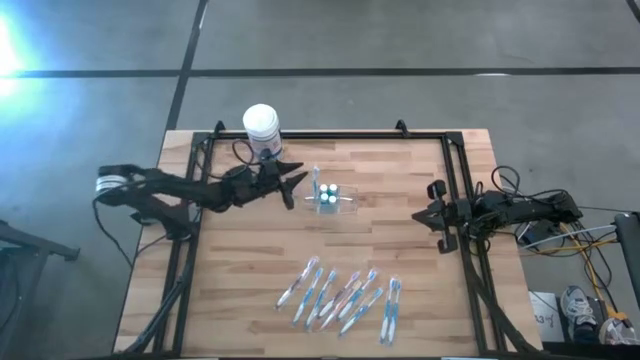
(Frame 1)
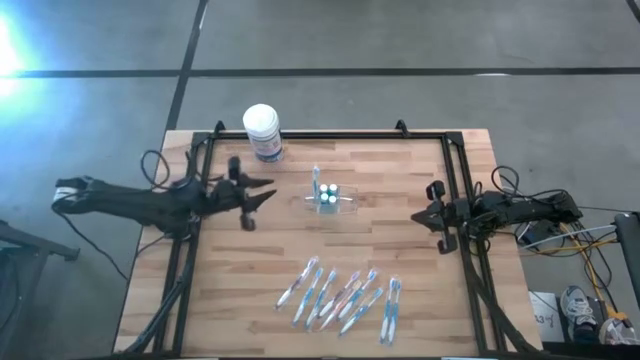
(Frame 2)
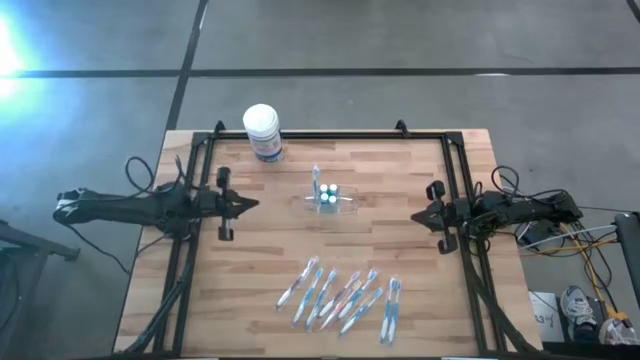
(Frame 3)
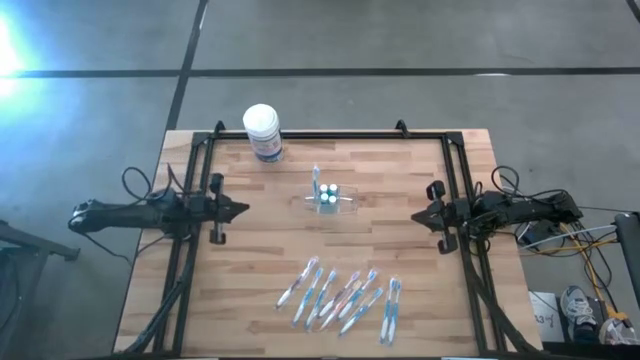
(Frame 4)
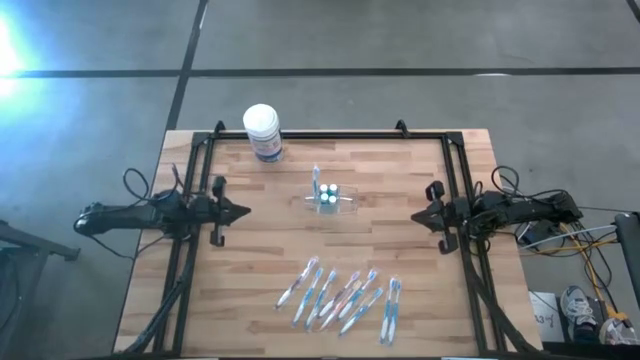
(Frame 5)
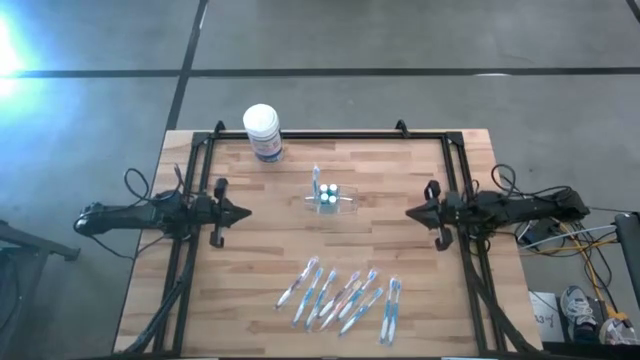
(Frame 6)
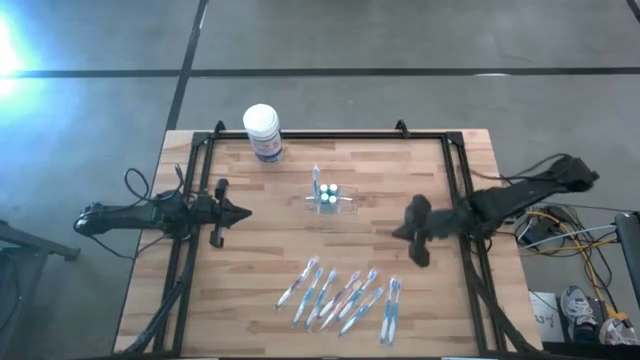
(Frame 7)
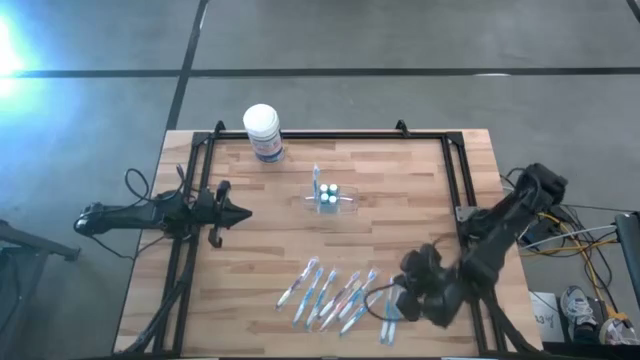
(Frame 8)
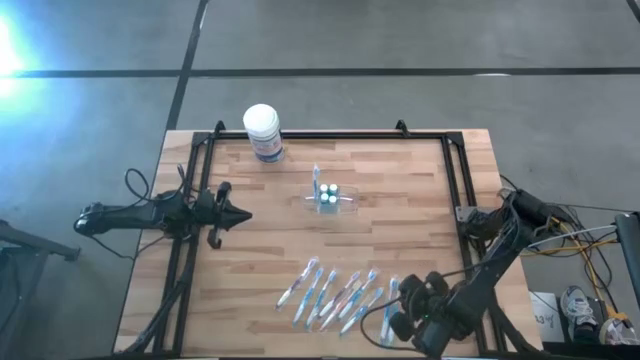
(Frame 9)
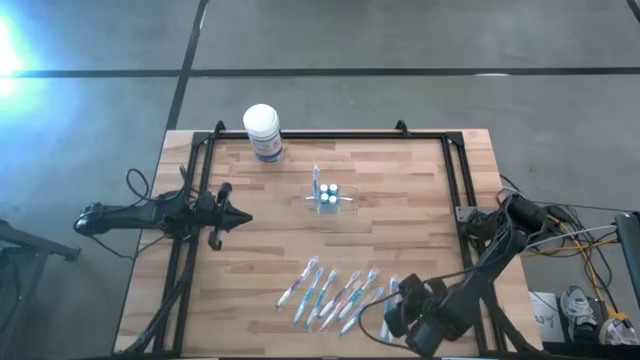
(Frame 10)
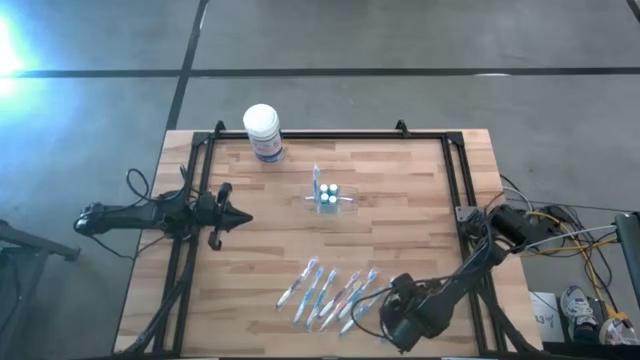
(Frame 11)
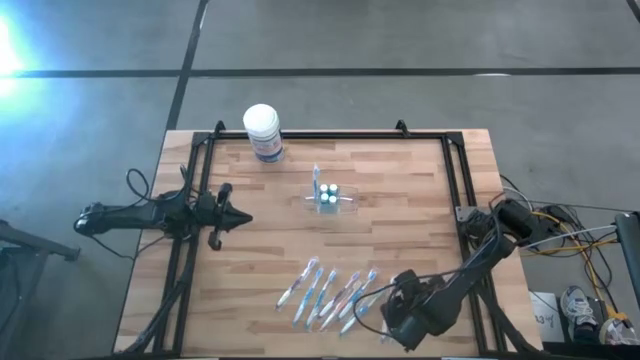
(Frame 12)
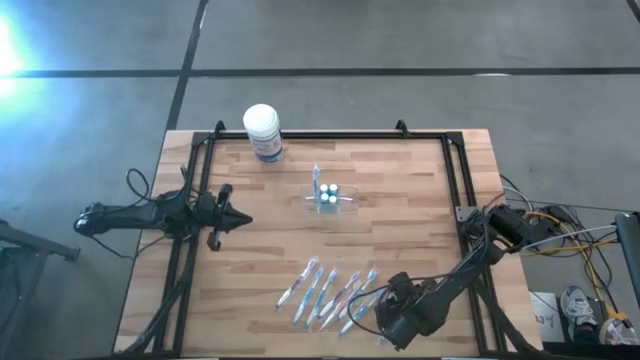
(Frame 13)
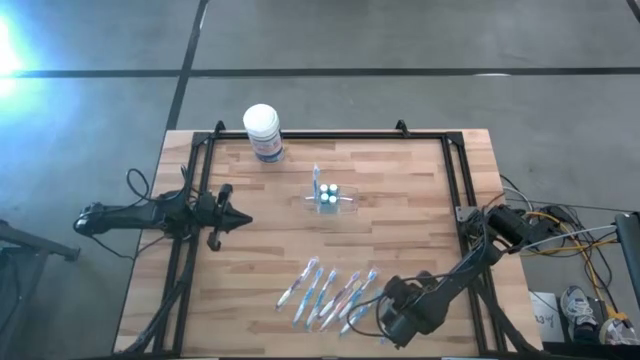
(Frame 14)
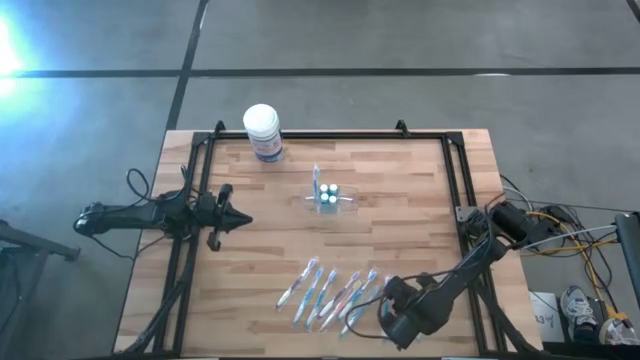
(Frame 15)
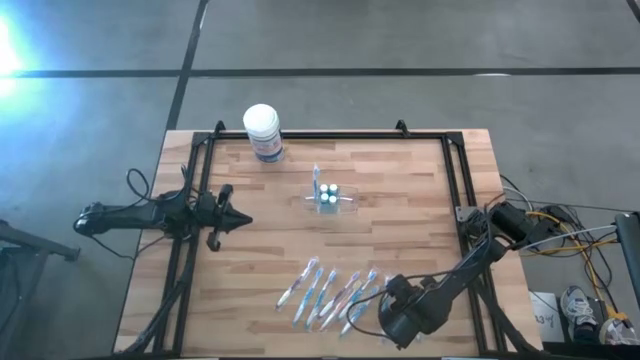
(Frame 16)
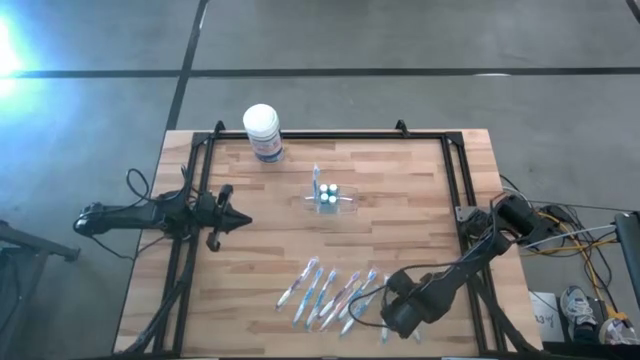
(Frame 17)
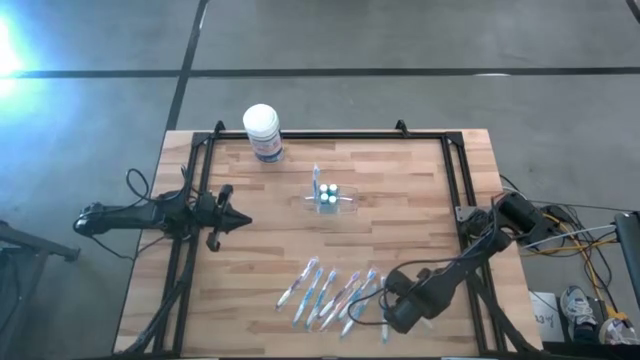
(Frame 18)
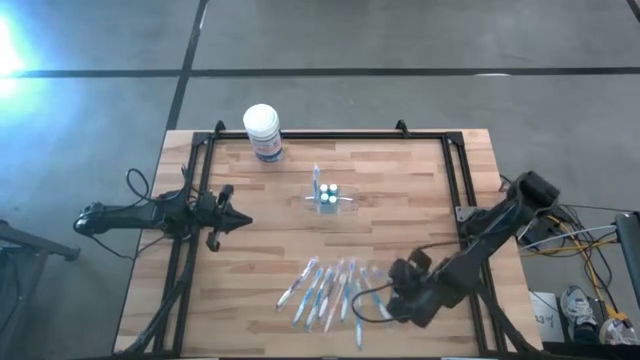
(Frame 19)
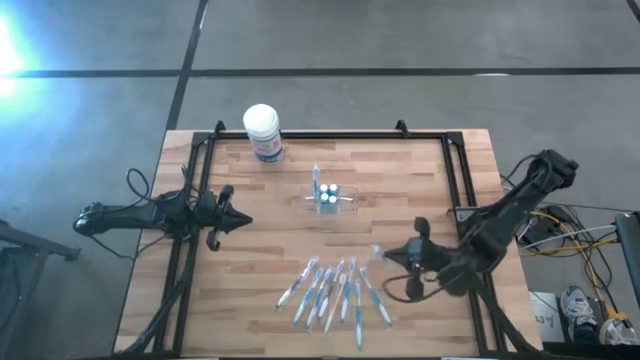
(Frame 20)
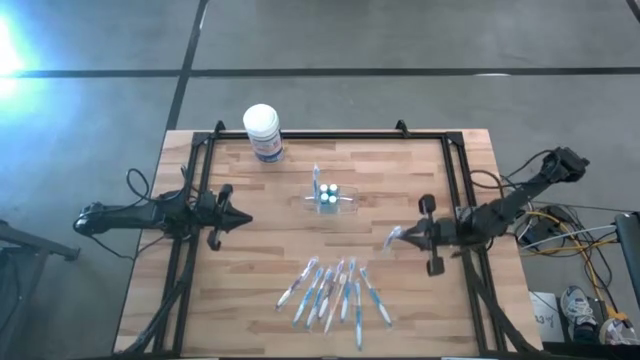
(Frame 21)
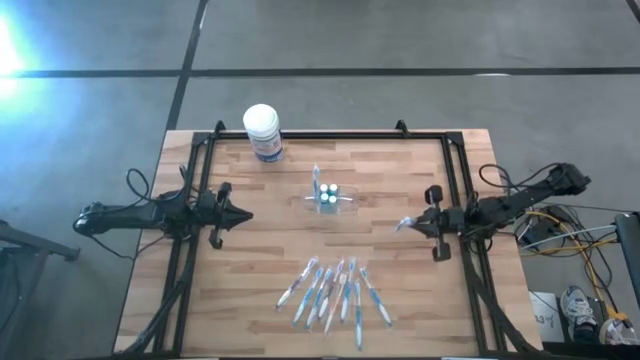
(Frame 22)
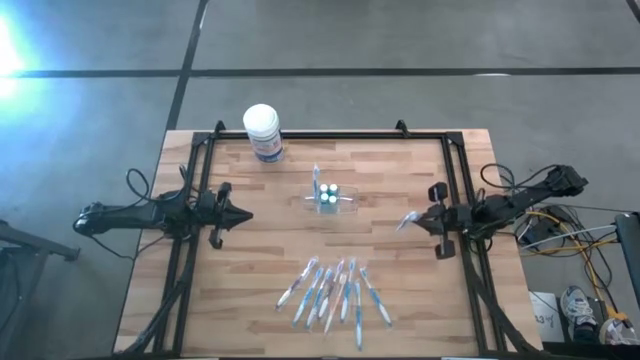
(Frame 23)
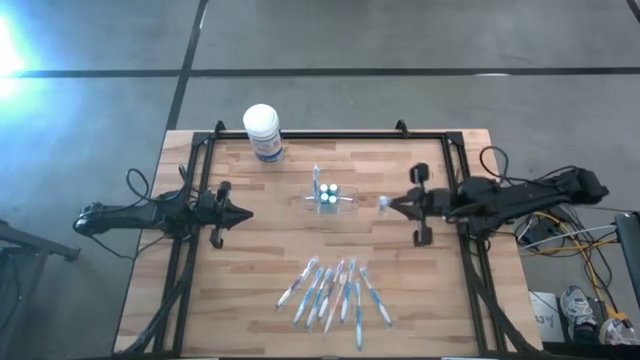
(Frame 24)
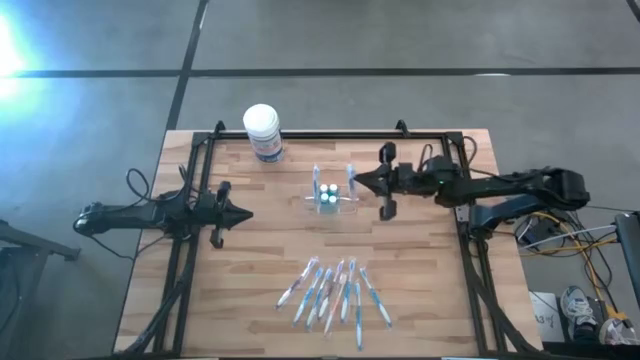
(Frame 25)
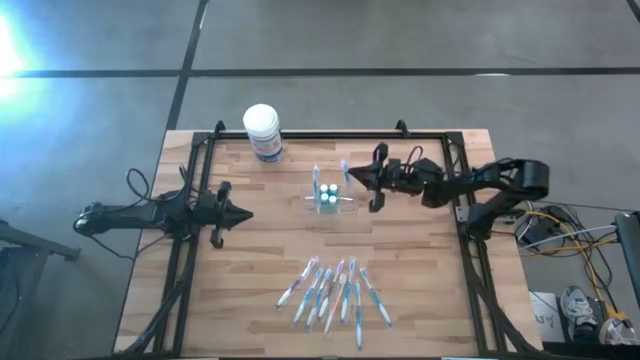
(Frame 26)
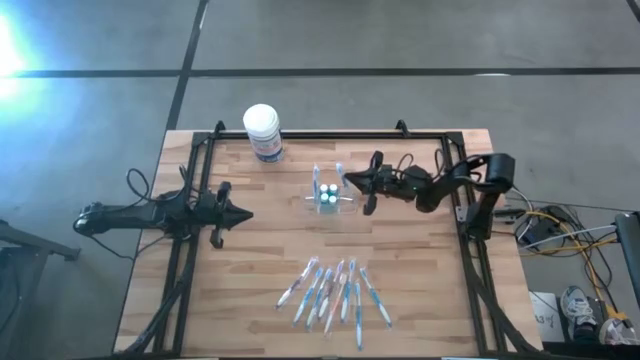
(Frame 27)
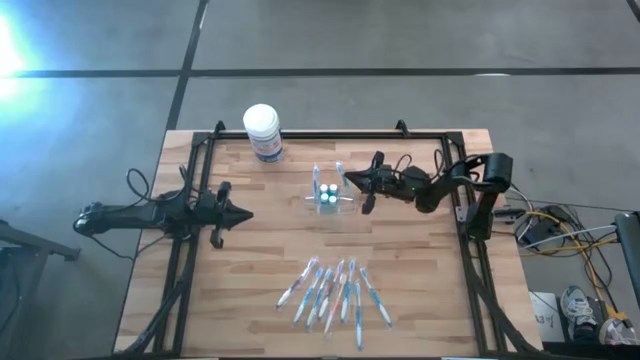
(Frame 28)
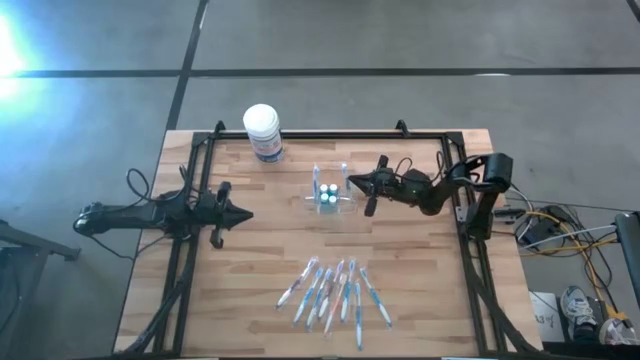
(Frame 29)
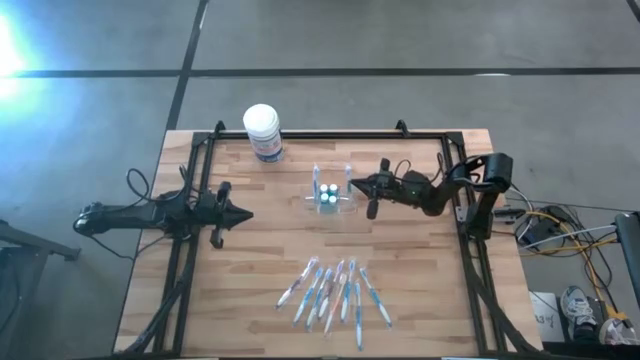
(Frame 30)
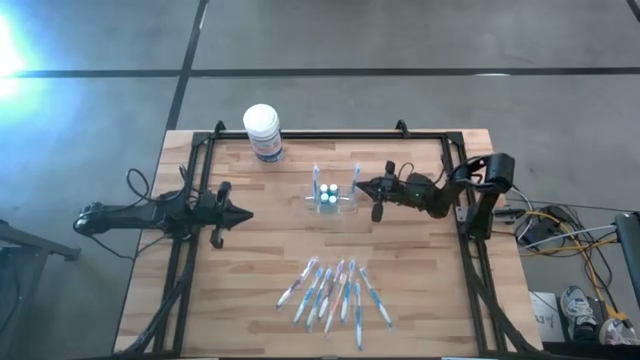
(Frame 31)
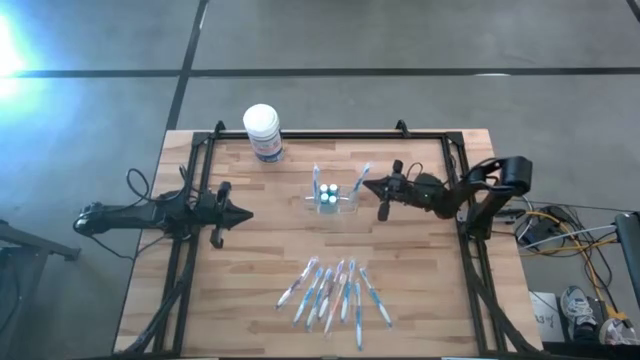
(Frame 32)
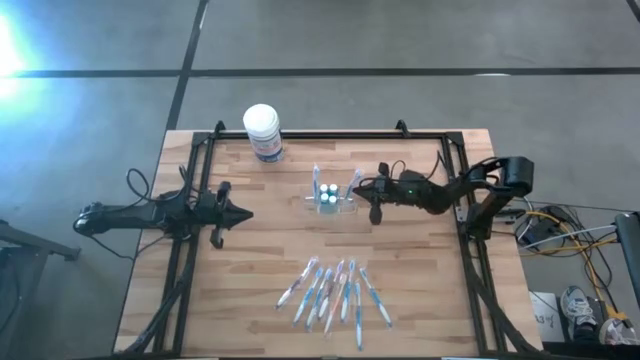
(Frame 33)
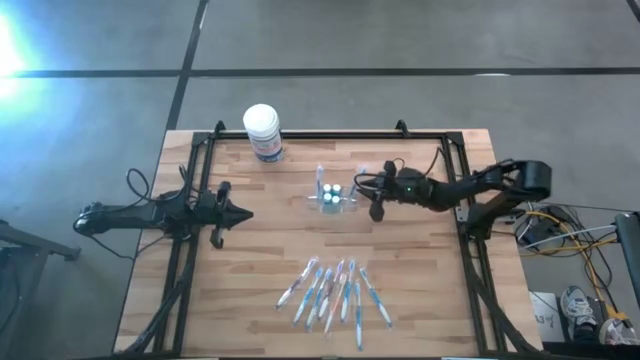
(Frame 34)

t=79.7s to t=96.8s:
Task: Pick & Place toothbrushing station
Put the blue toothbrush into the transparent bin organizer

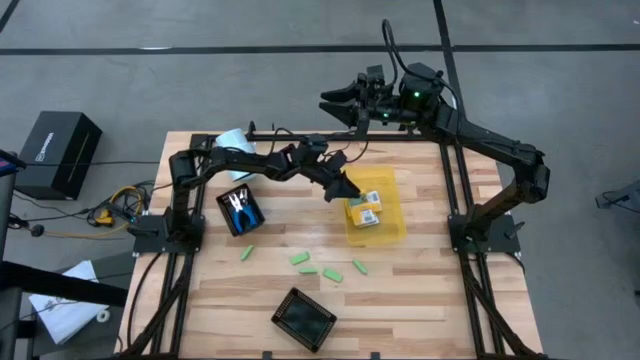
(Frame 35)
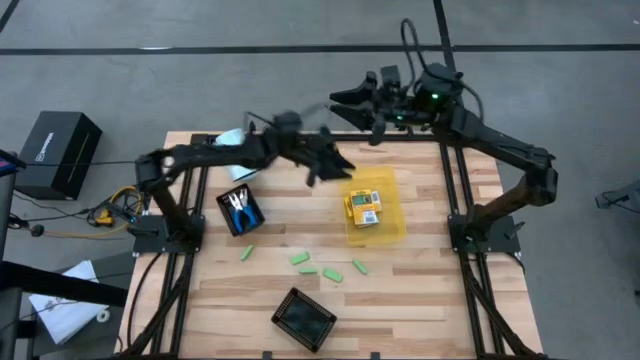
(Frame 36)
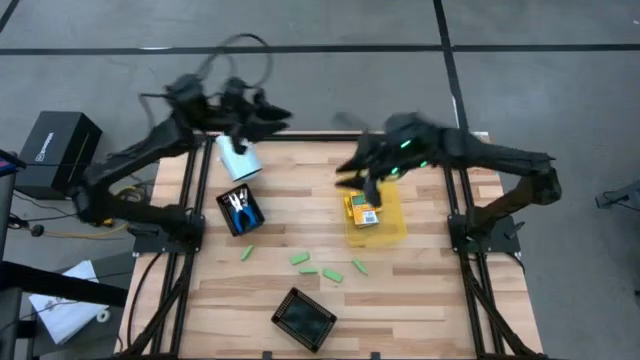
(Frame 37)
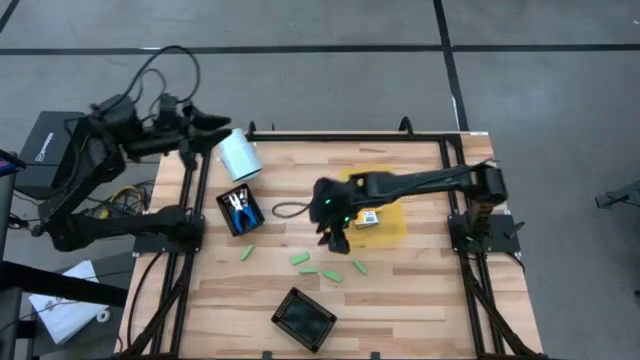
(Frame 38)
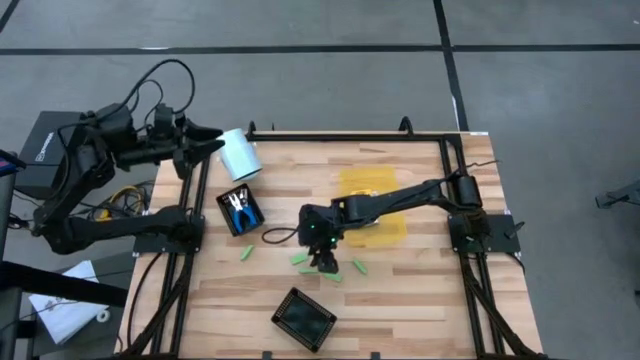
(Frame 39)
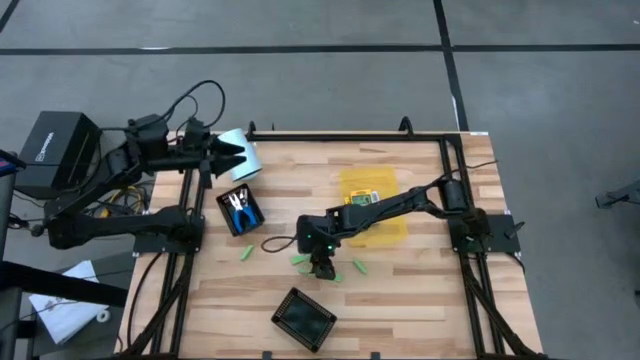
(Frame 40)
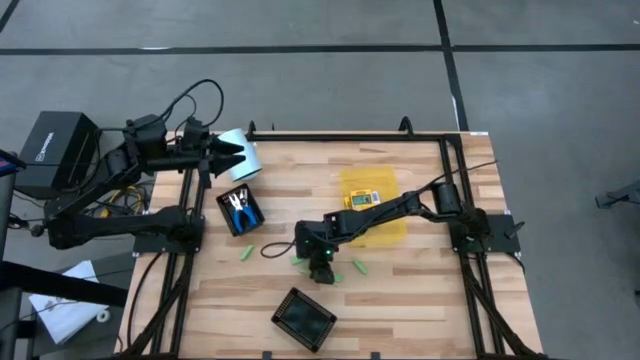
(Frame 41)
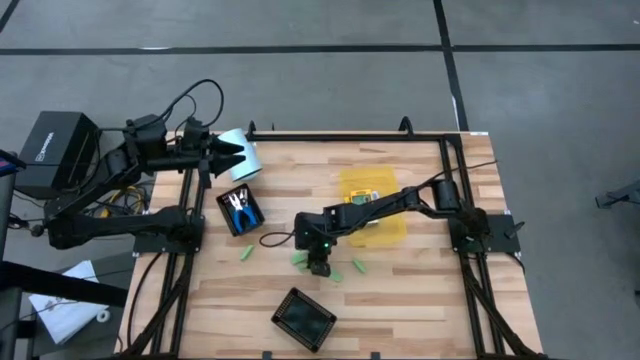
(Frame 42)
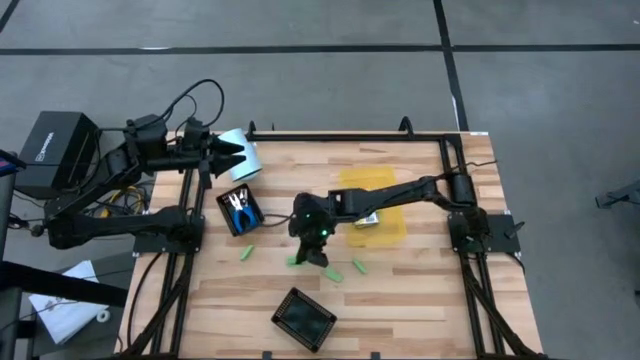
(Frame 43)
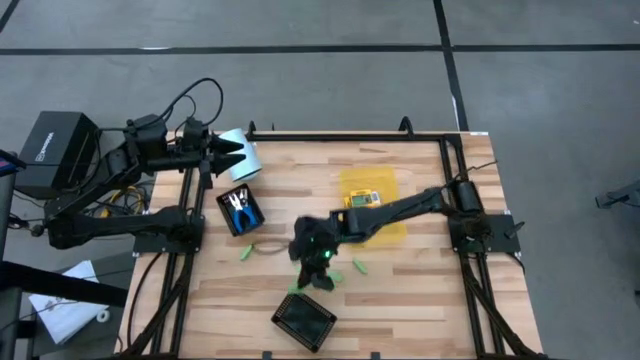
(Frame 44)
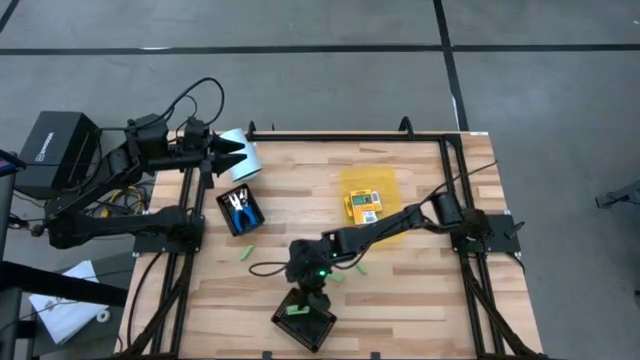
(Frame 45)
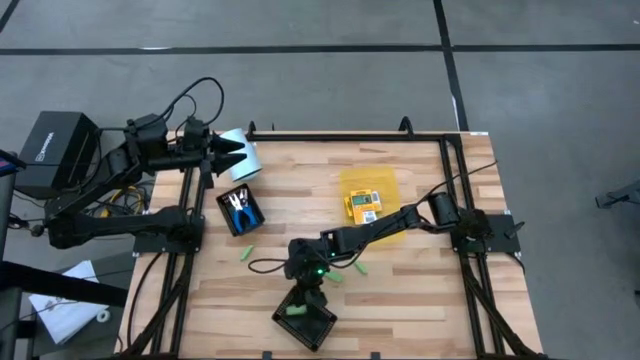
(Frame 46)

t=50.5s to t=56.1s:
Task: Pick & Place School Supplies
Put the green eraser into the bottom black bin
